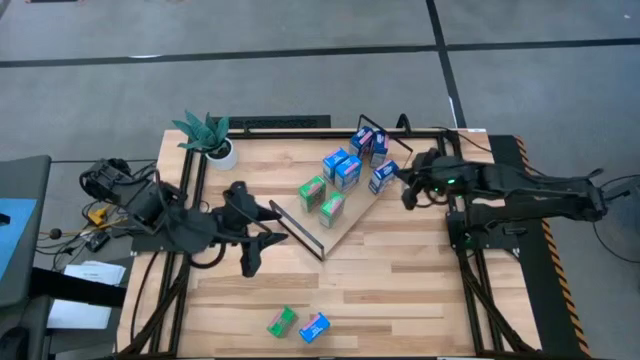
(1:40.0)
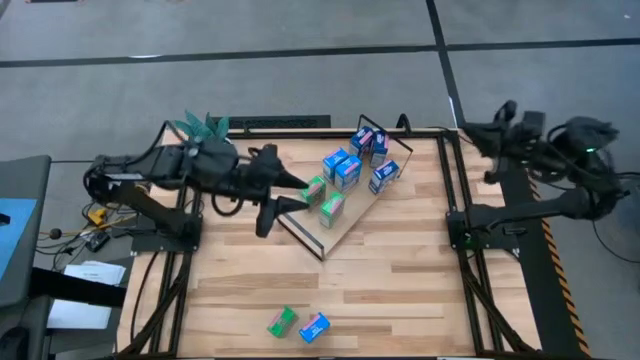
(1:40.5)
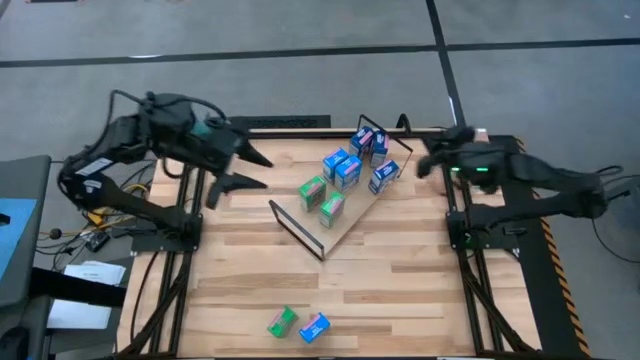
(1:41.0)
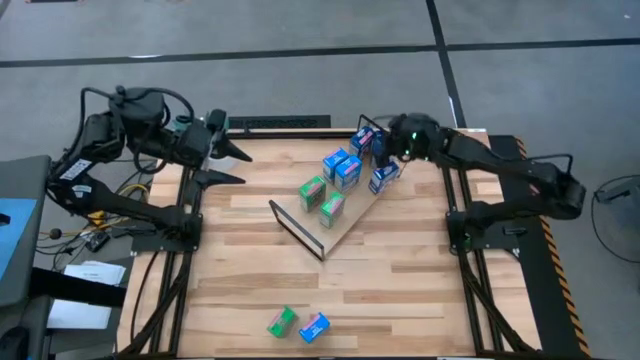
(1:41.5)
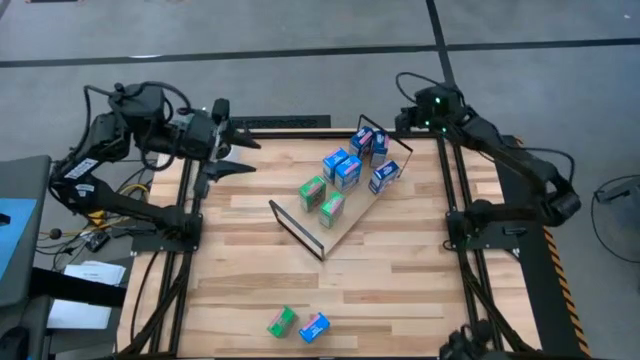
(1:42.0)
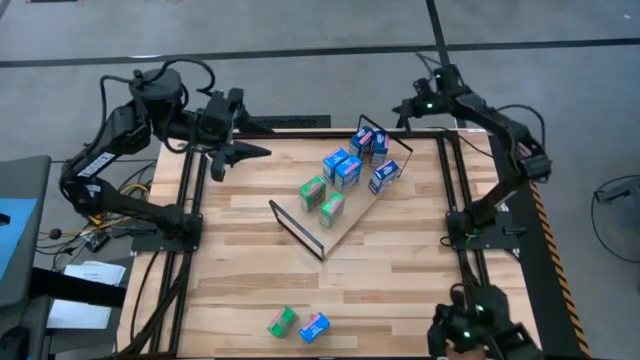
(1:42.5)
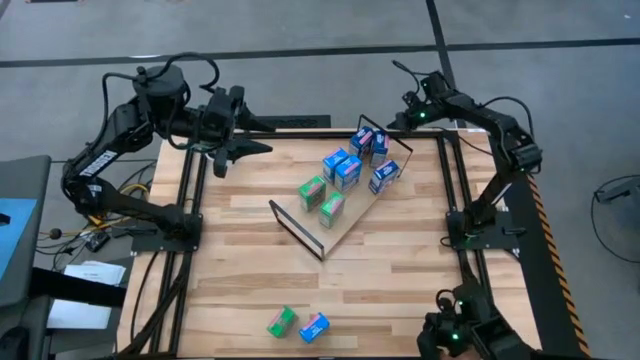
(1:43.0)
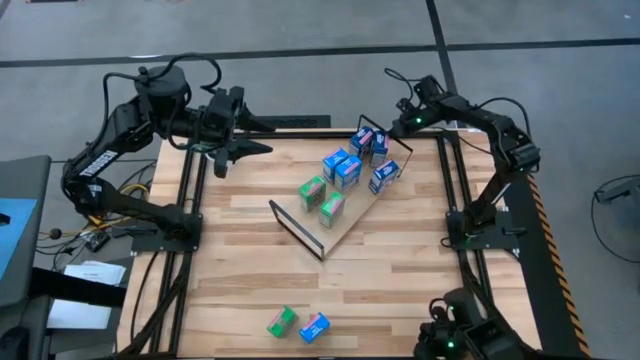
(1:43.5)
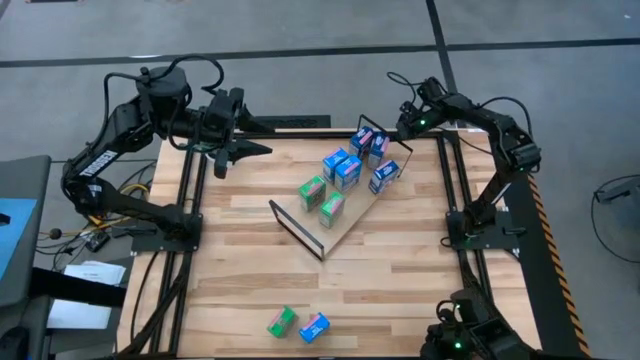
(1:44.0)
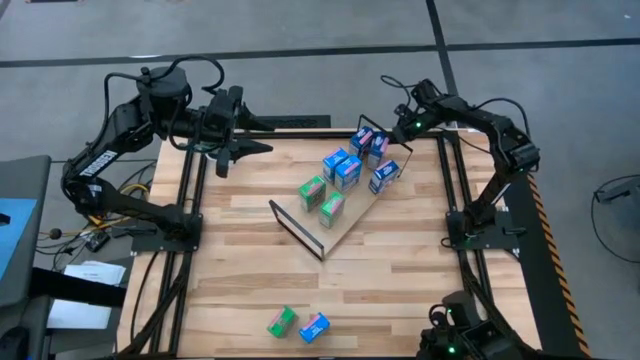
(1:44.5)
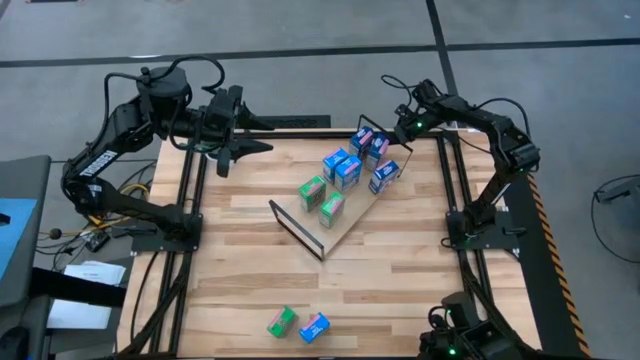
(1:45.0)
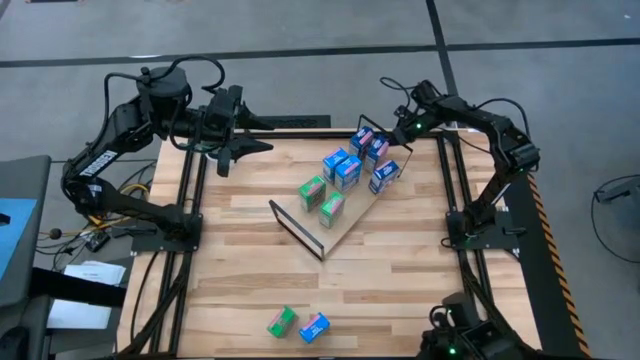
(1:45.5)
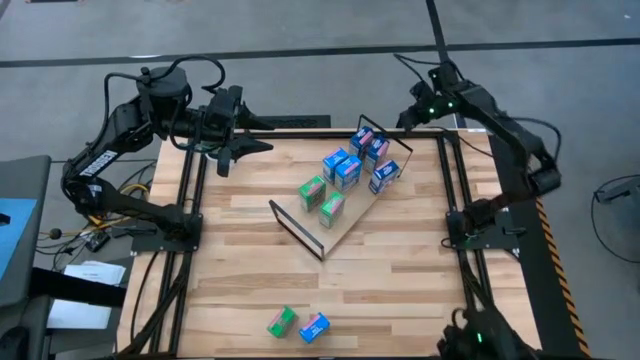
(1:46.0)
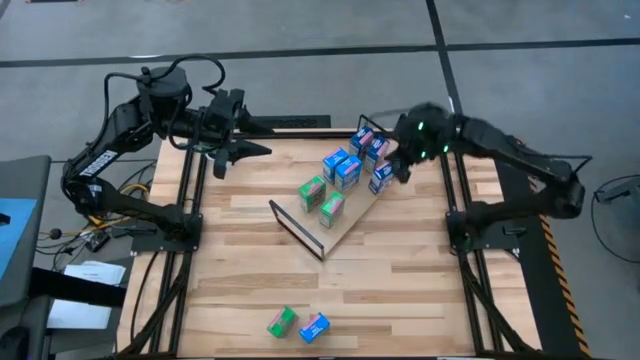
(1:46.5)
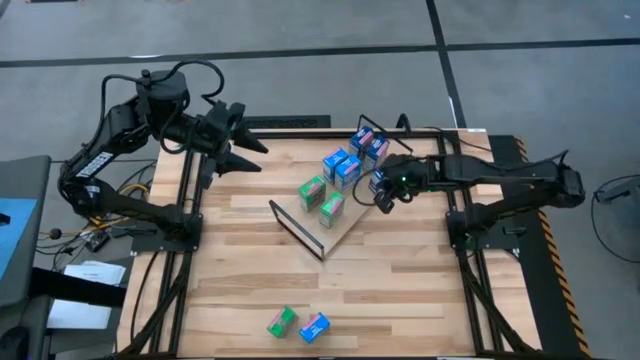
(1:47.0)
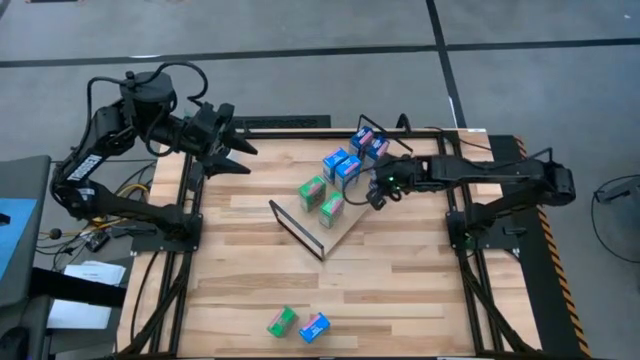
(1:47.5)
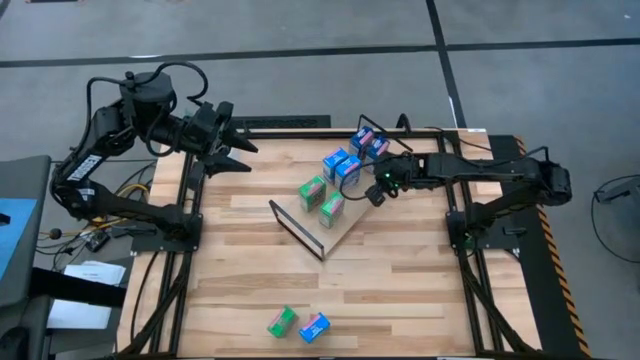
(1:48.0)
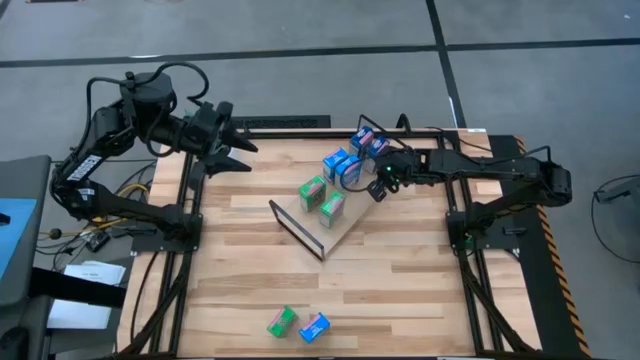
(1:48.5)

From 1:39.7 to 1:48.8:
Task: Stack cereal on shelf
Adjust the blue cereal boxes on the shelf

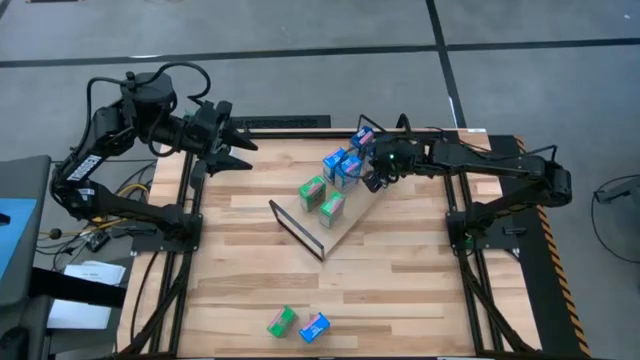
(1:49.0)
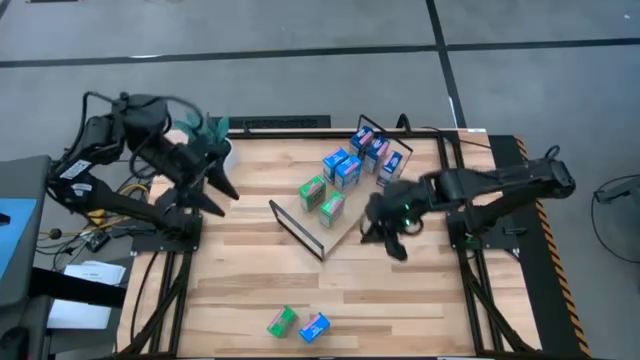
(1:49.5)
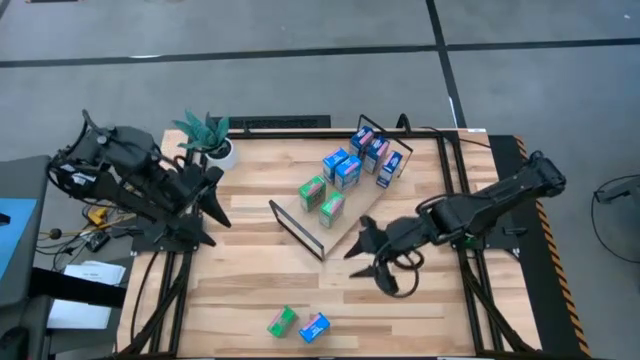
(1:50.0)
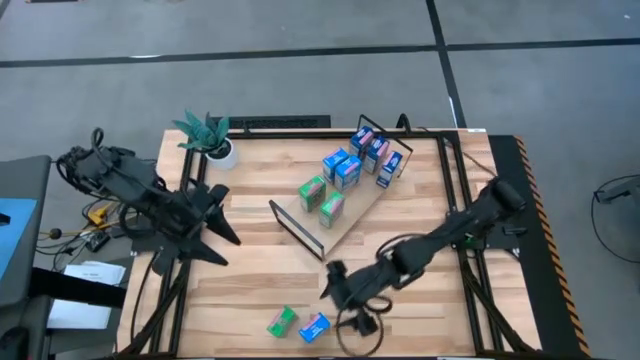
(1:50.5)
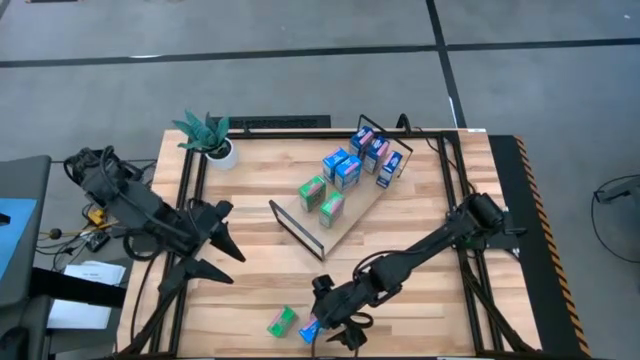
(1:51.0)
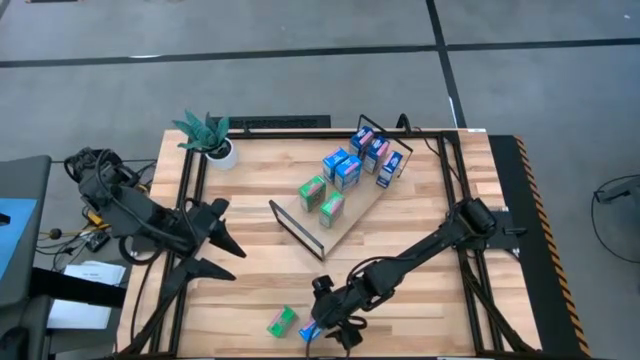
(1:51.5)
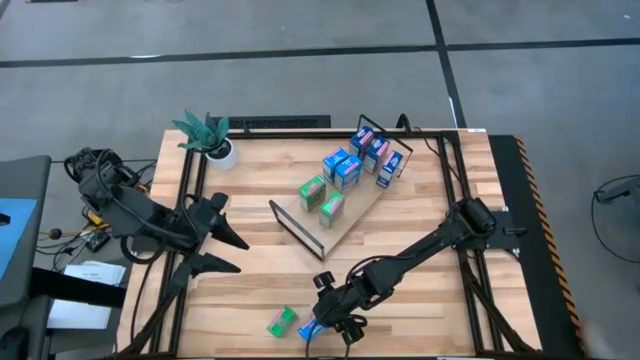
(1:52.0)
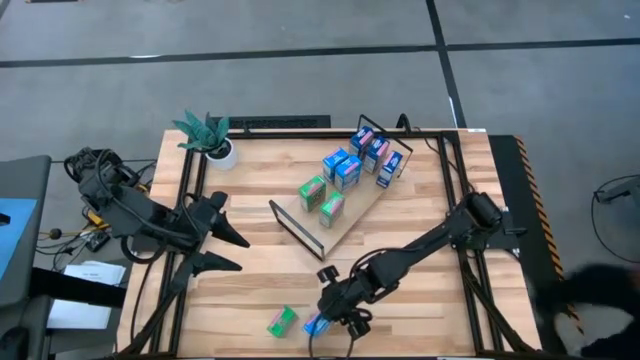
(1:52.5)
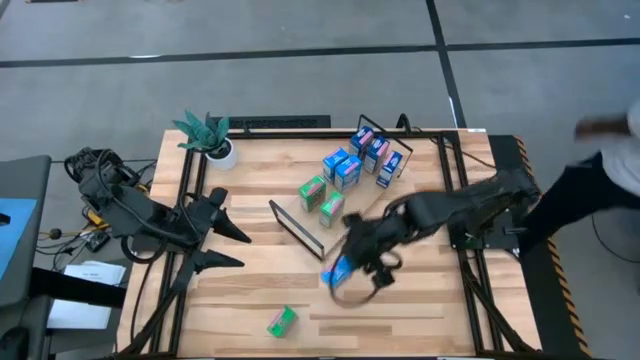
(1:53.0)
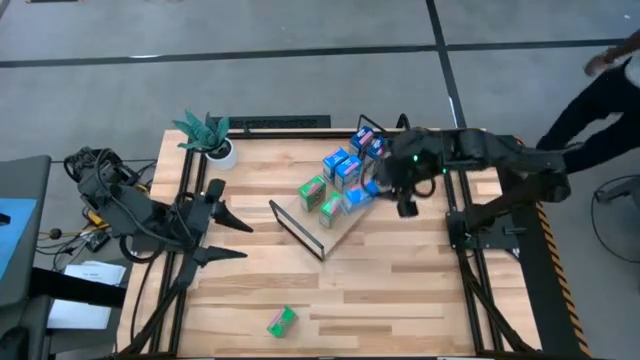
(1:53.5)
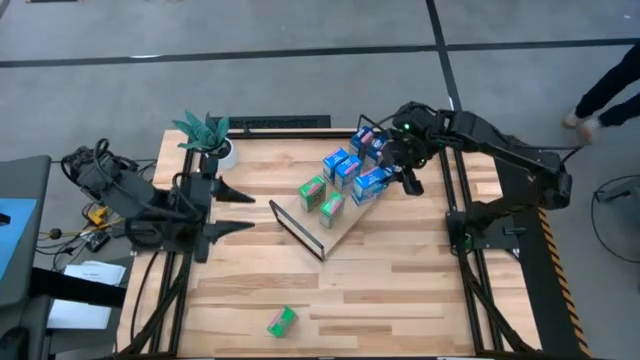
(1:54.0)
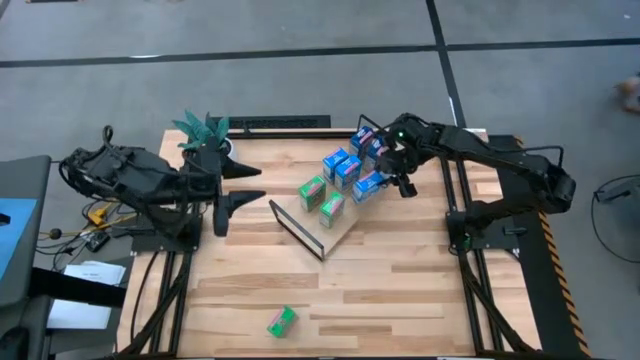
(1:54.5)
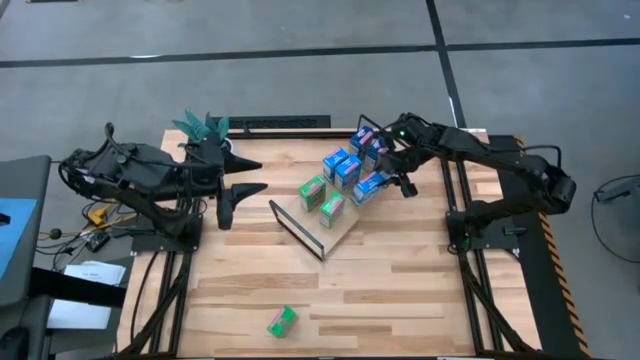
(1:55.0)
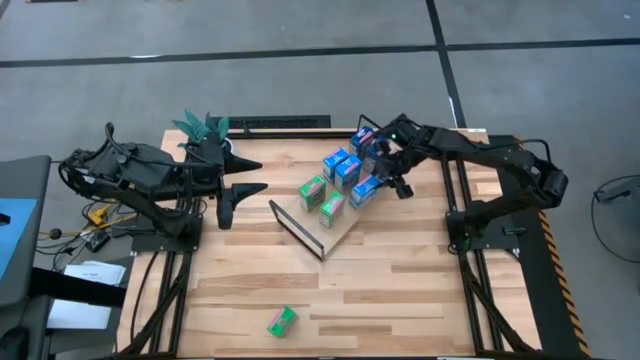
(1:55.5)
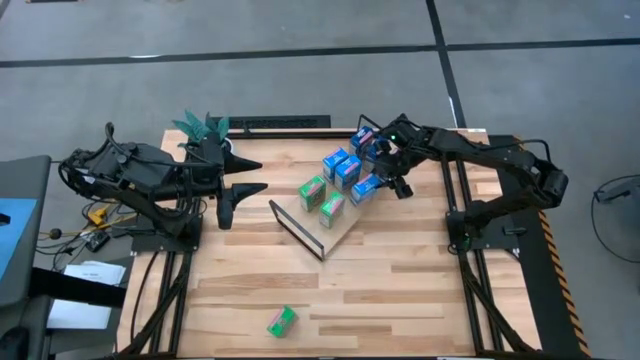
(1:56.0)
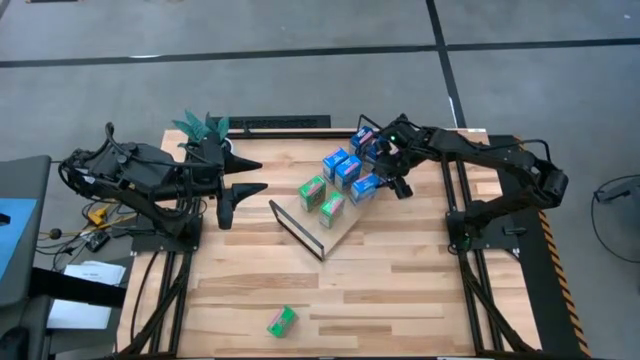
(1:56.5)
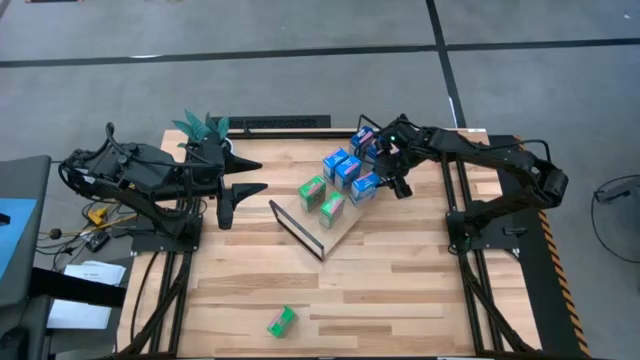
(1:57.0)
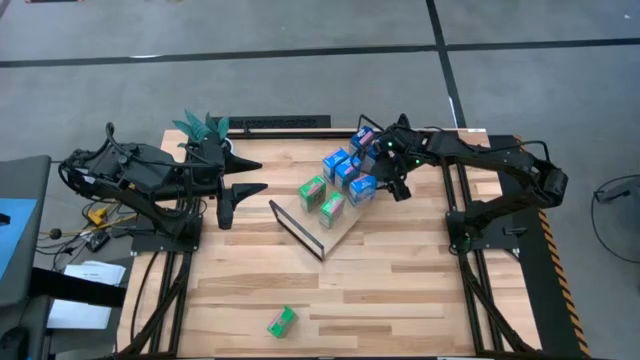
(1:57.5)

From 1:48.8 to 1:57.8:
Put the light blue cereal box on the shelf aligned with the light blue cereal boxes

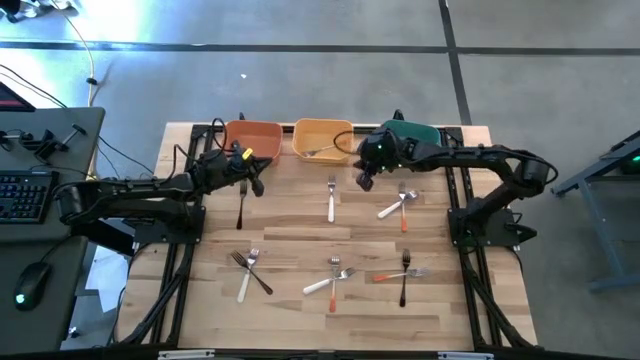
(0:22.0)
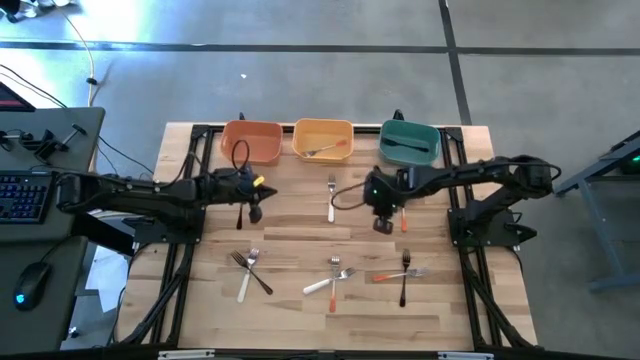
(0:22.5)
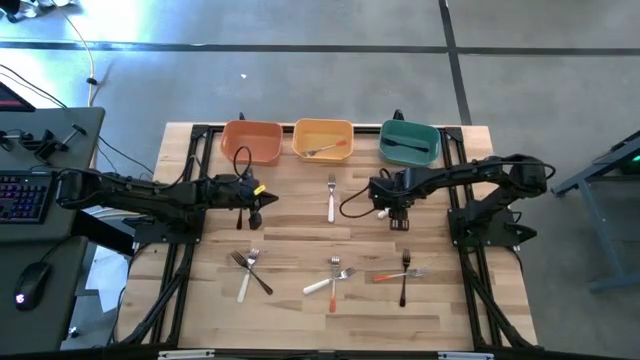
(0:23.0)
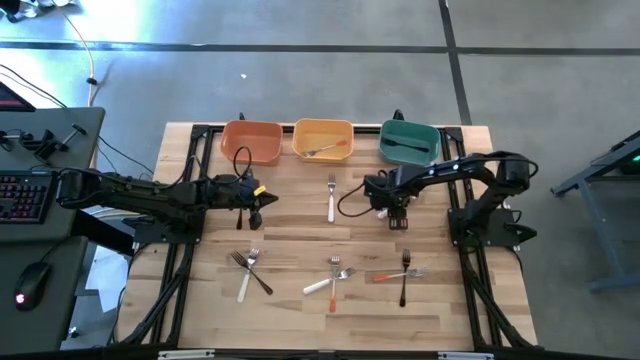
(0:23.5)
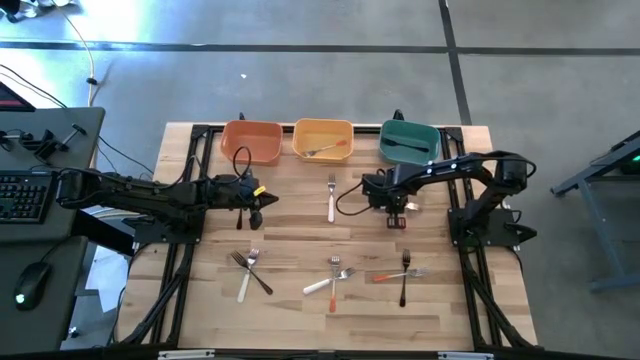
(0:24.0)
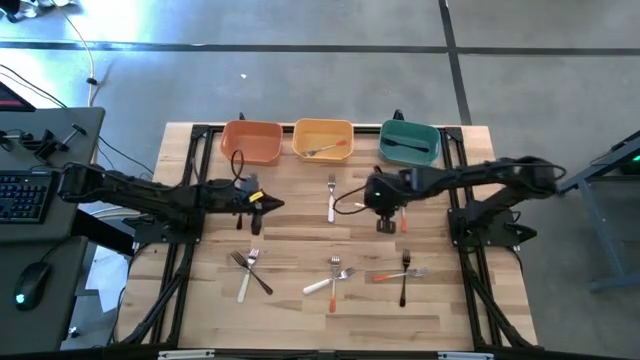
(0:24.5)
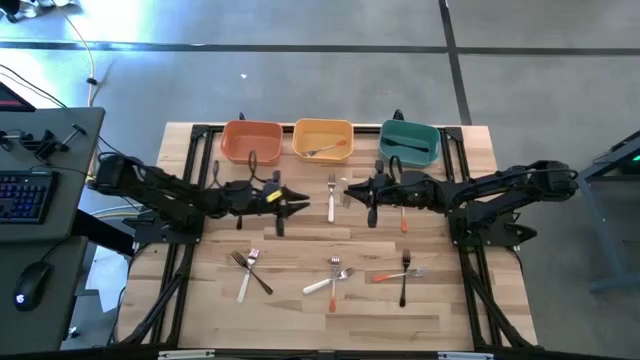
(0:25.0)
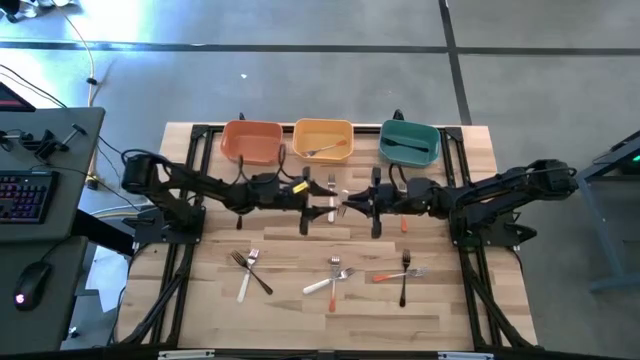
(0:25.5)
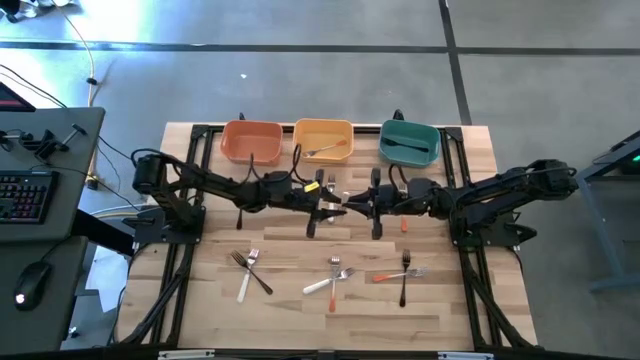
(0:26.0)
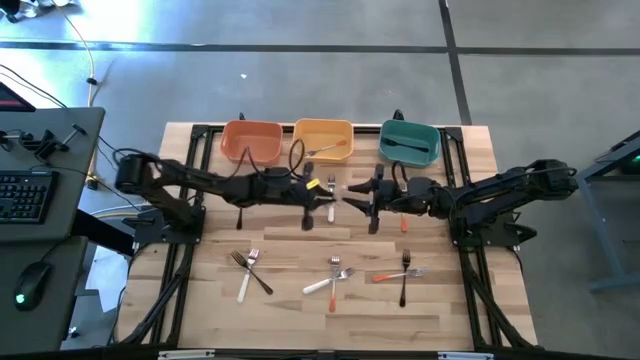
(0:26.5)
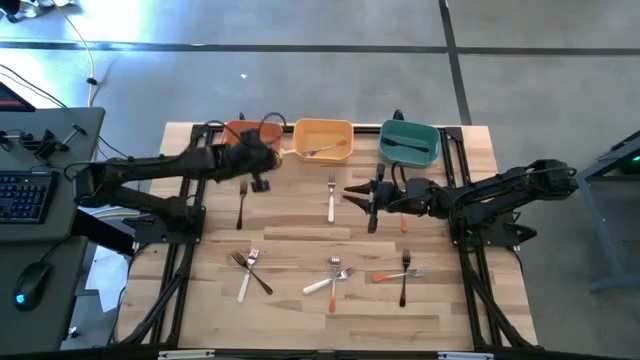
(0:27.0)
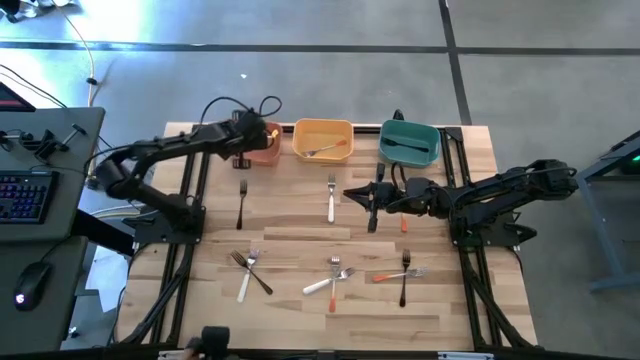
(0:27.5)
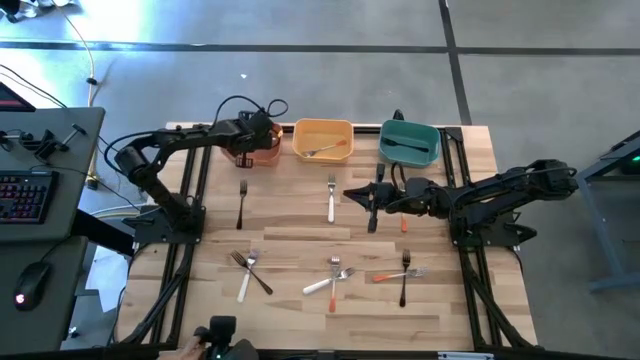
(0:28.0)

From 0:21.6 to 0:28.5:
Task: Sort silverware by color (type)
Put the white fork into the orange bin
